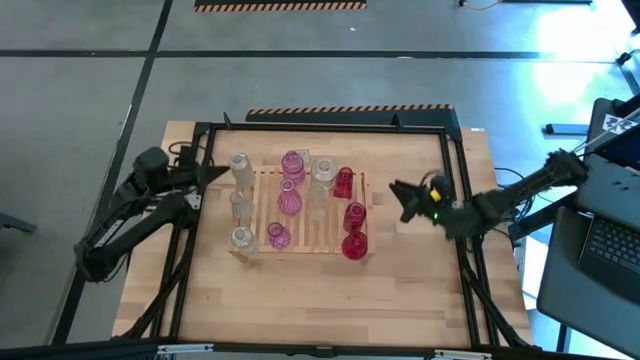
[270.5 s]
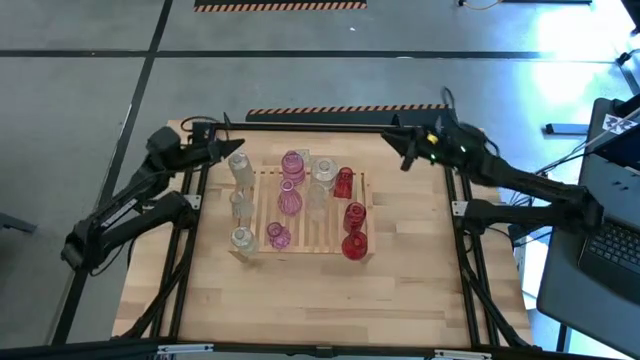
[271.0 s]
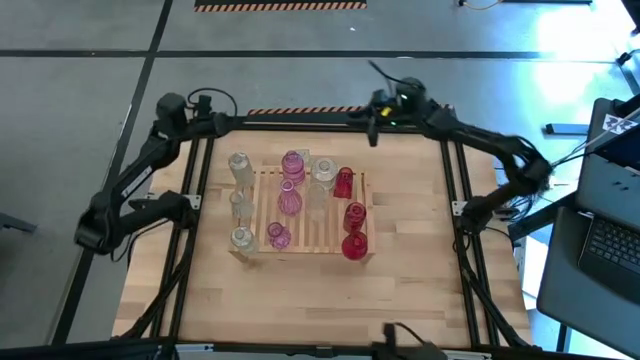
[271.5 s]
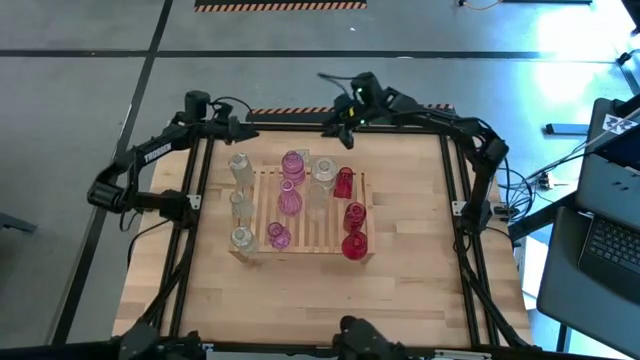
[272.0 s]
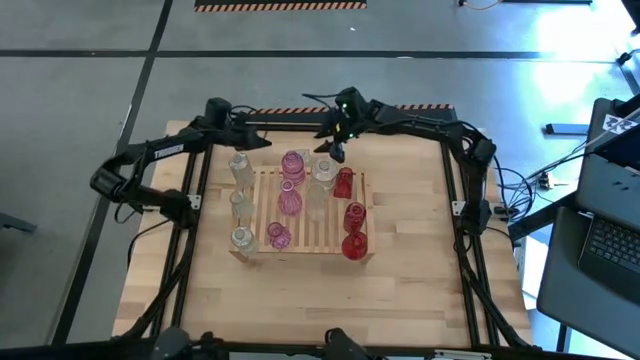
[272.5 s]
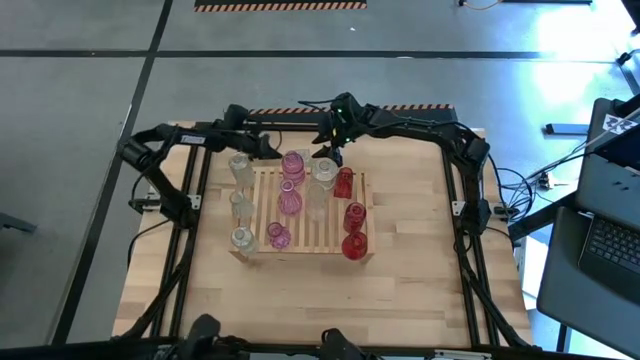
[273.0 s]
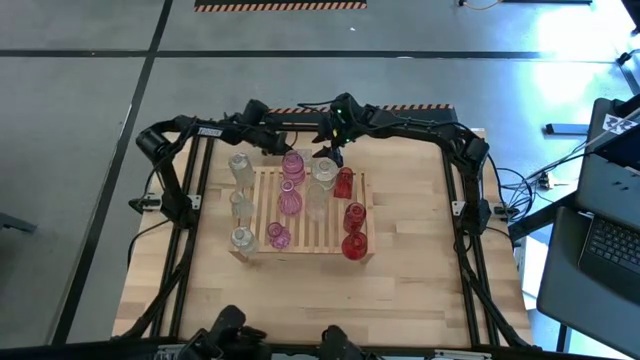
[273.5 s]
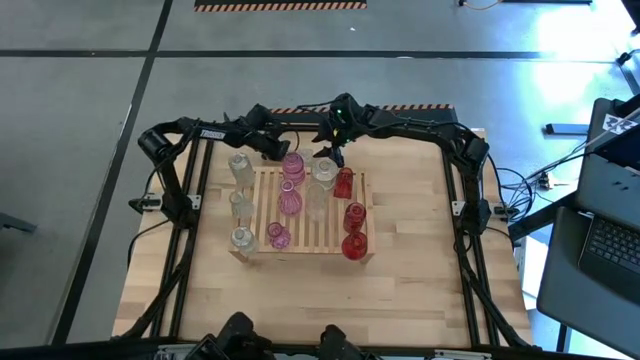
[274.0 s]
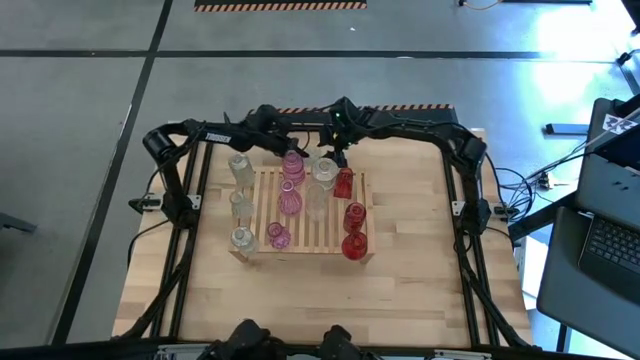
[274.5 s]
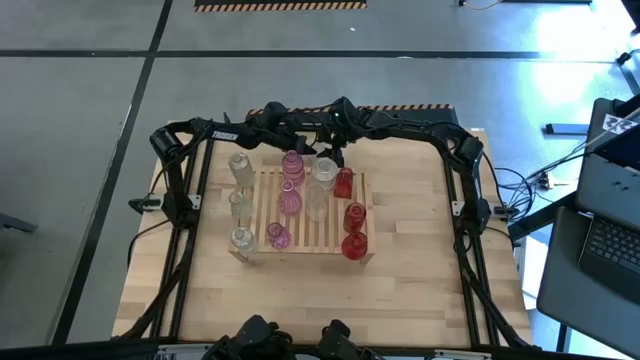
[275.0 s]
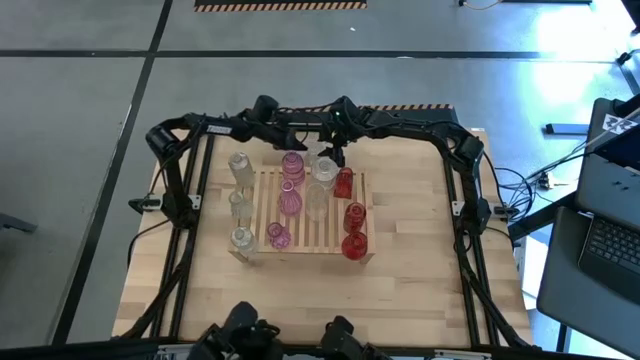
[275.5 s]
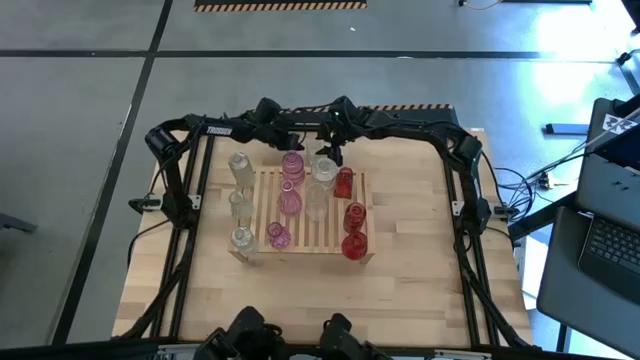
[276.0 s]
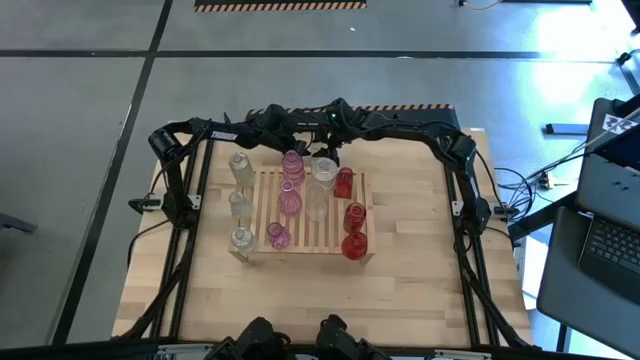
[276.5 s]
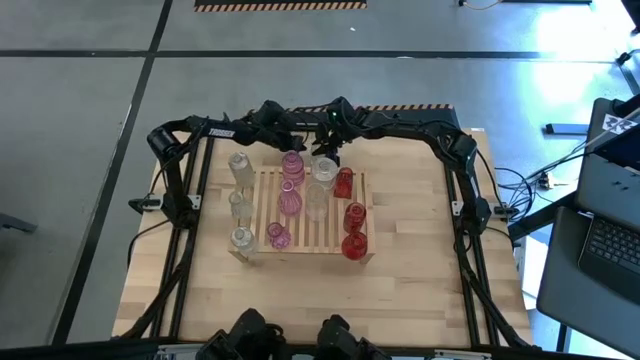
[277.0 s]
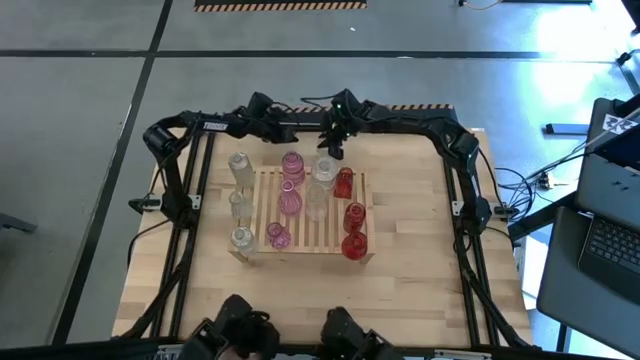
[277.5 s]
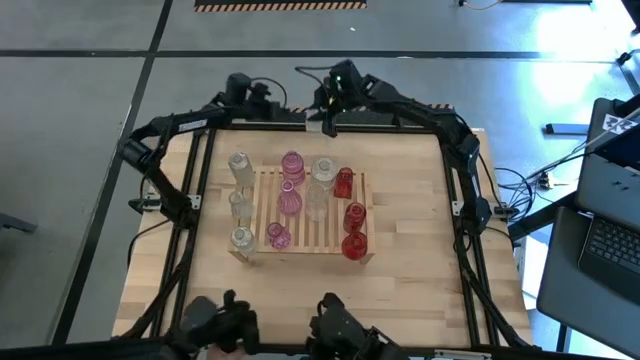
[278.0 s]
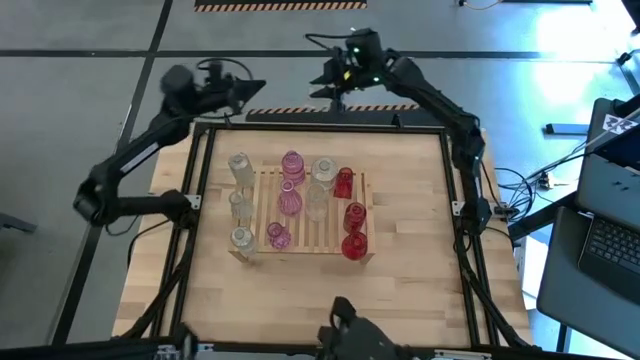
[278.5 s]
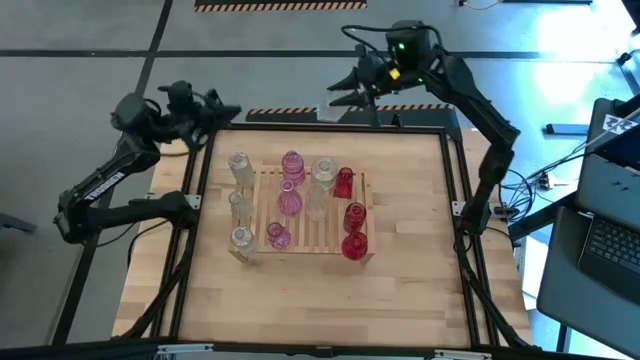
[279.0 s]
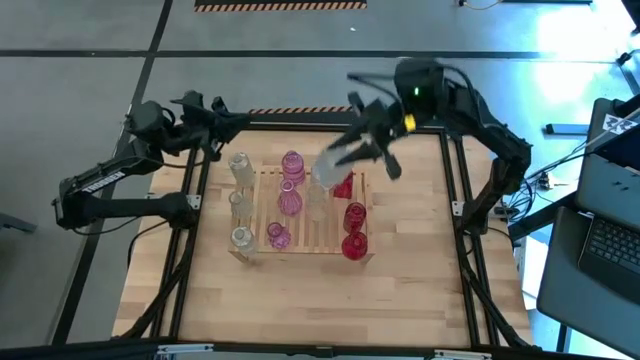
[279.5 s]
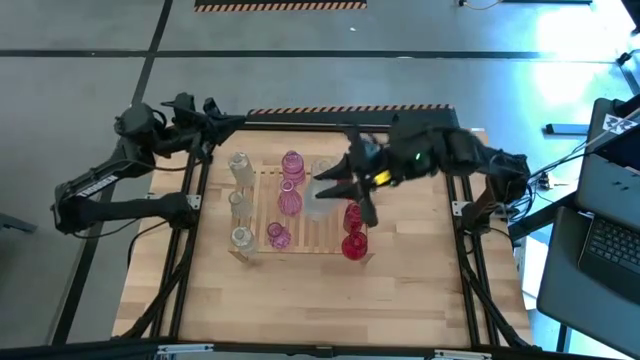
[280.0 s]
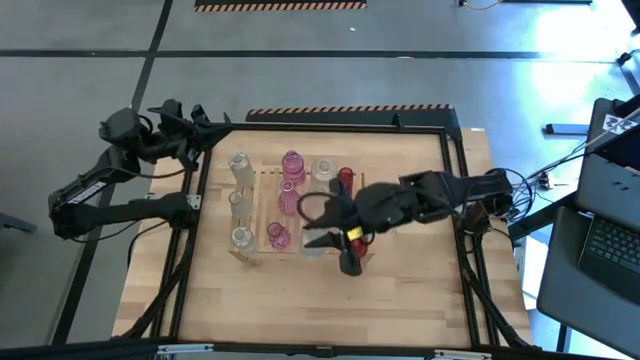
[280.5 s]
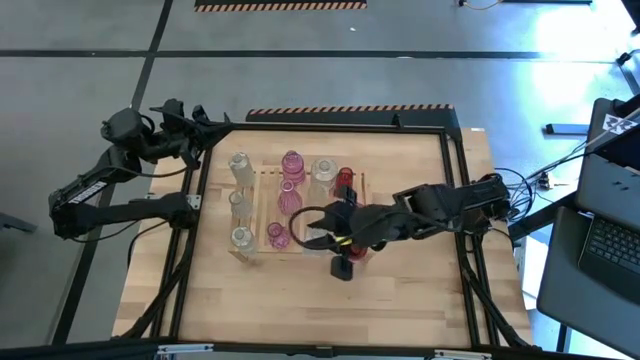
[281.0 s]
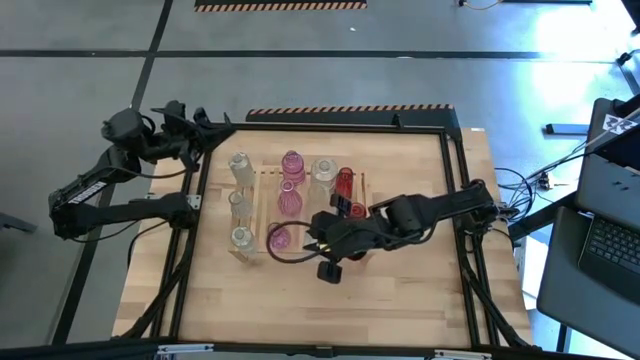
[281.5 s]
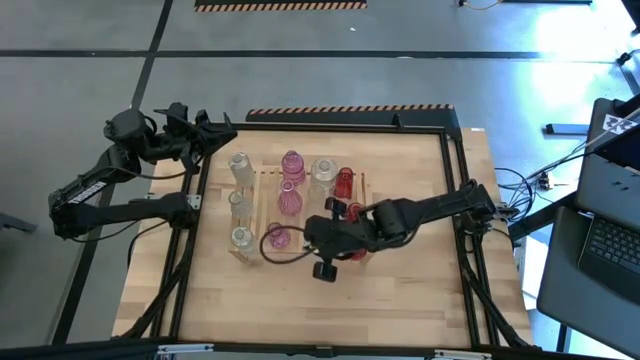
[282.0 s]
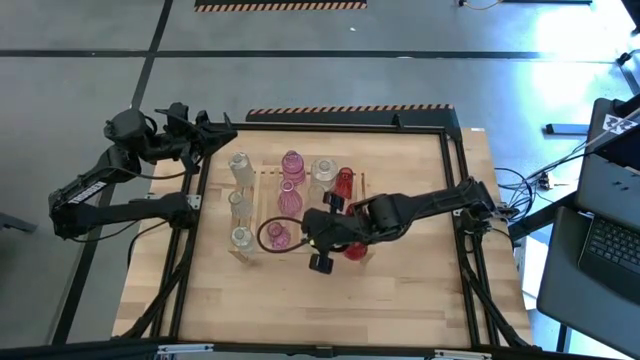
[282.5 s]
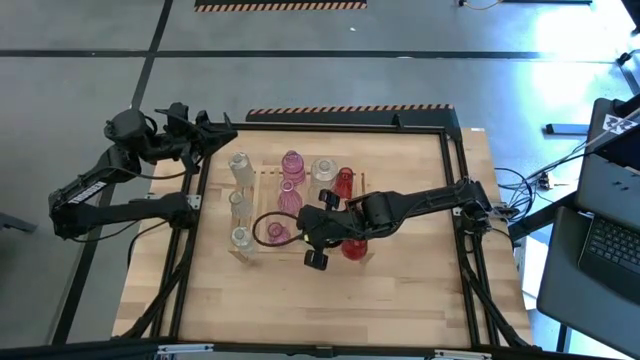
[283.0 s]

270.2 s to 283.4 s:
Task: sort vases onto shelf
Put the transparent vase on the shelf aligned with the other transparent vase

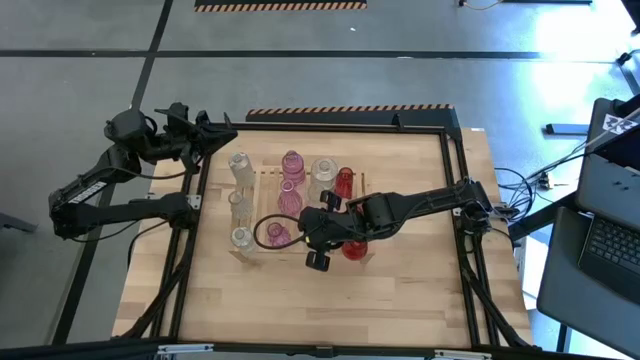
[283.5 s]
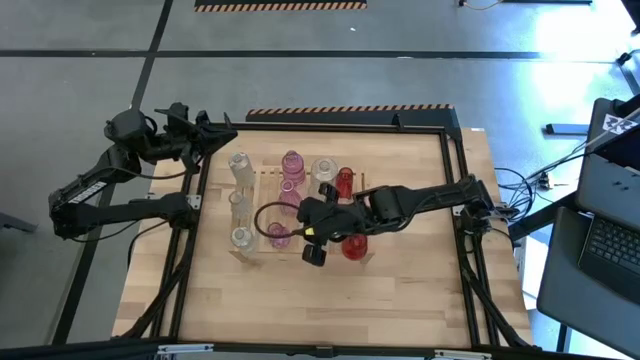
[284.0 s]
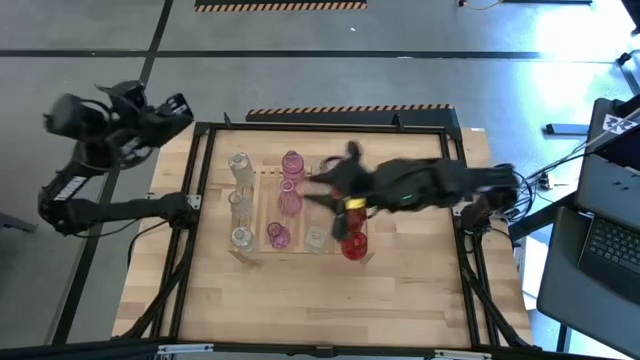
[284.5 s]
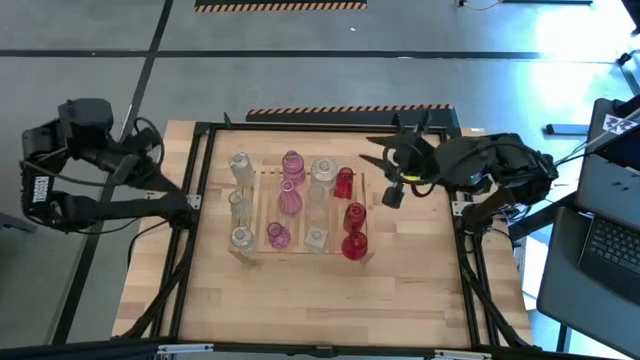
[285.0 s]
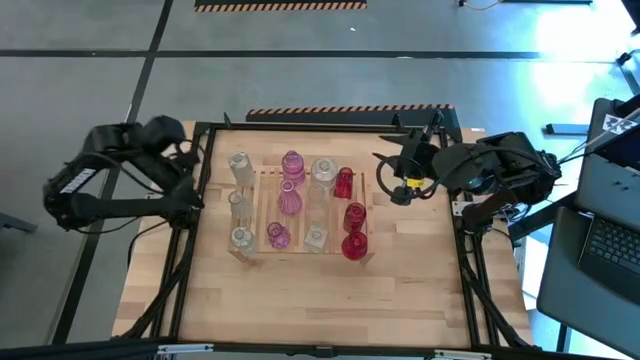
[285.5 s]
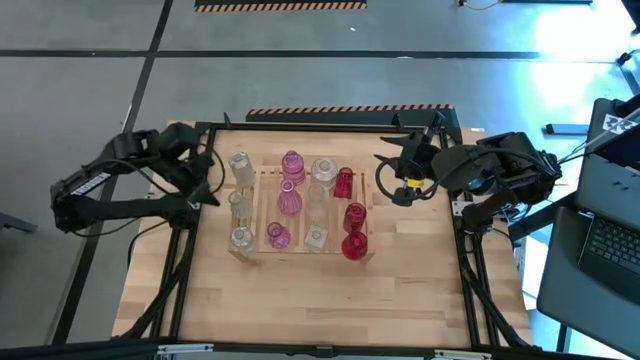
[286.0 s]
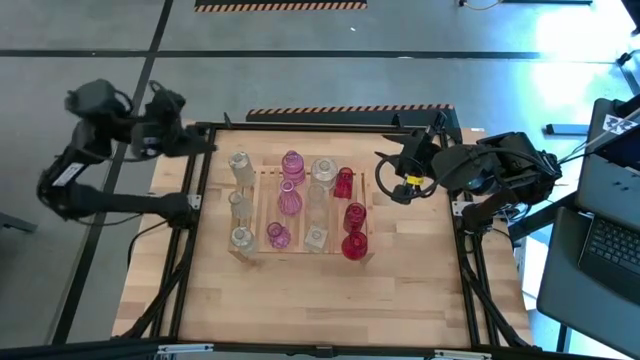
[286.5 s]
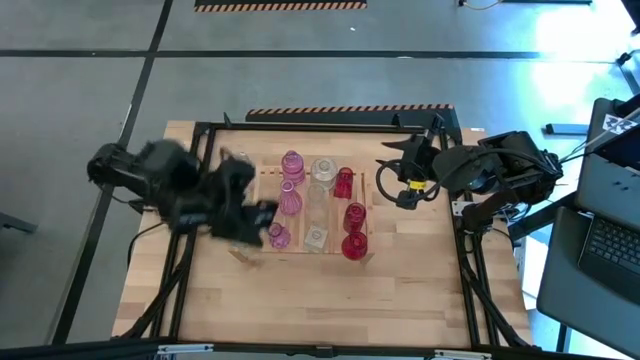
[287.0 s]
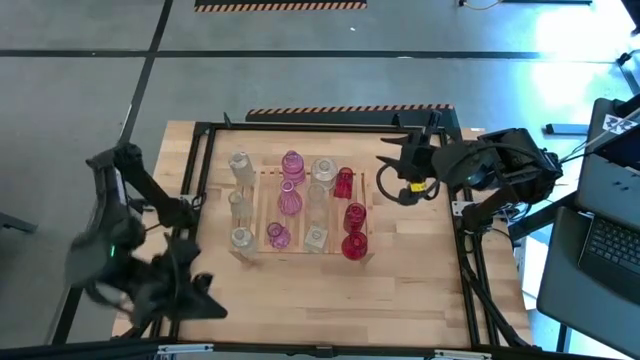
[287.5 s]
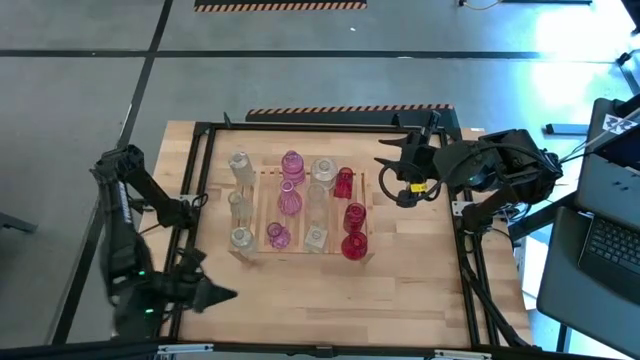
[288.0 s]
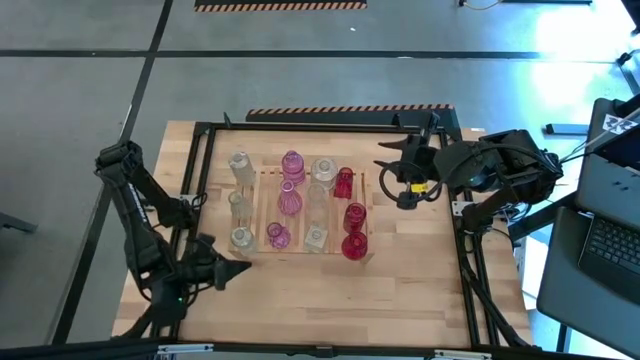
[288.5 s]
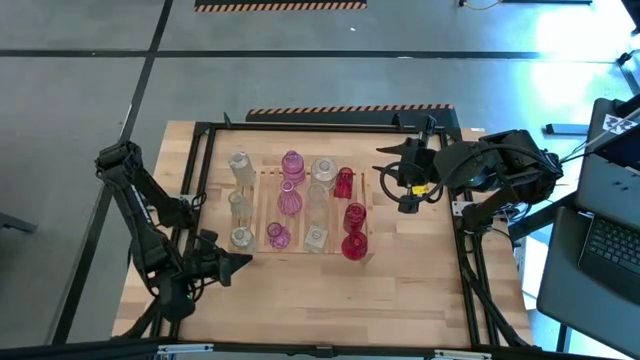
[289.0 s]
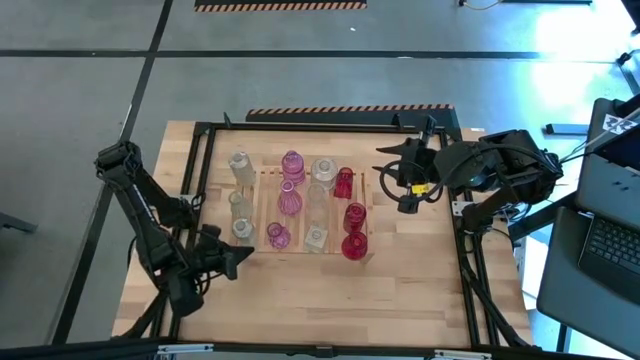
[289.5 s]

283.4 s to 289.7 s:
Adjust the transparent vase on the shelf

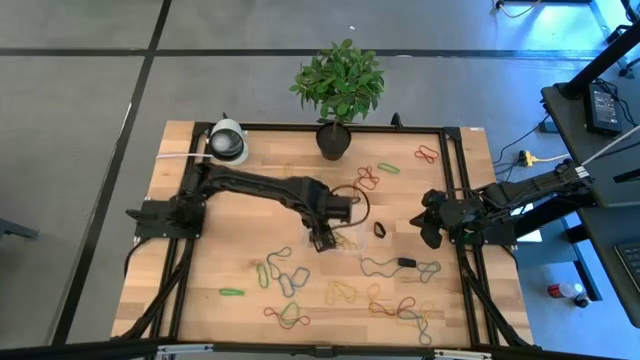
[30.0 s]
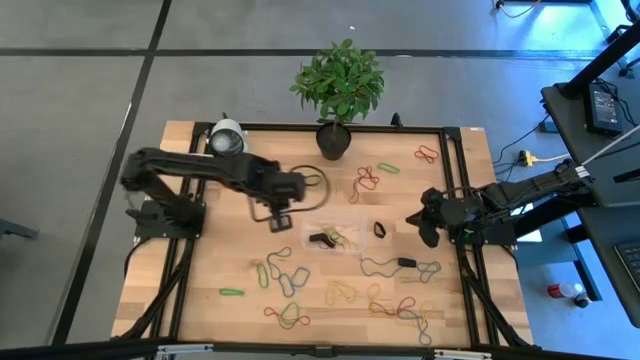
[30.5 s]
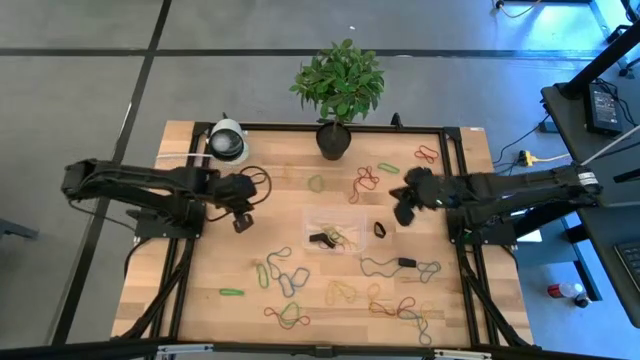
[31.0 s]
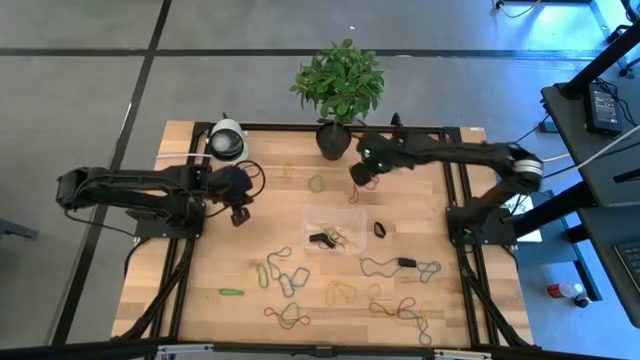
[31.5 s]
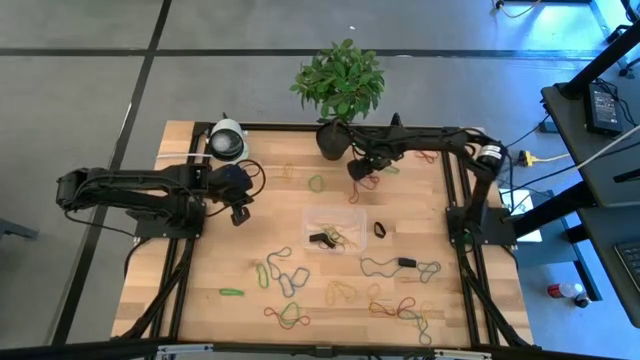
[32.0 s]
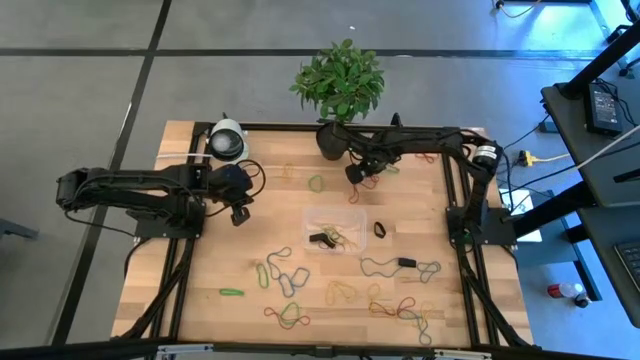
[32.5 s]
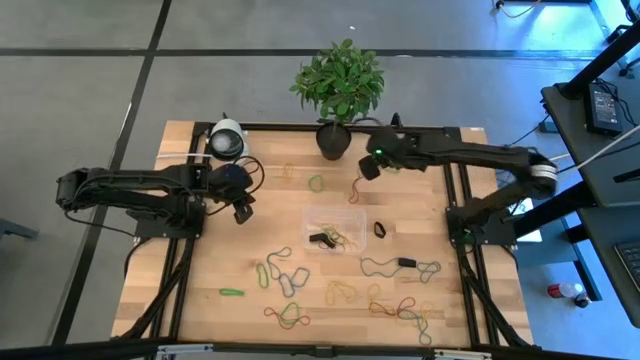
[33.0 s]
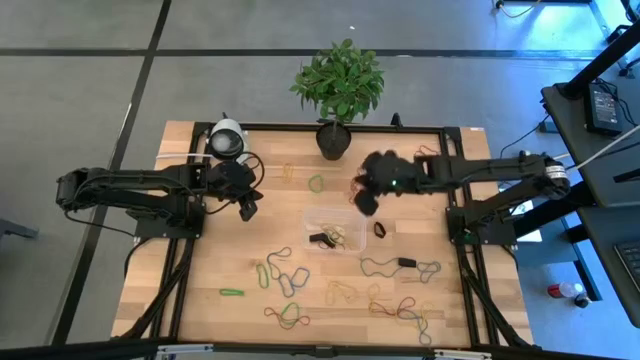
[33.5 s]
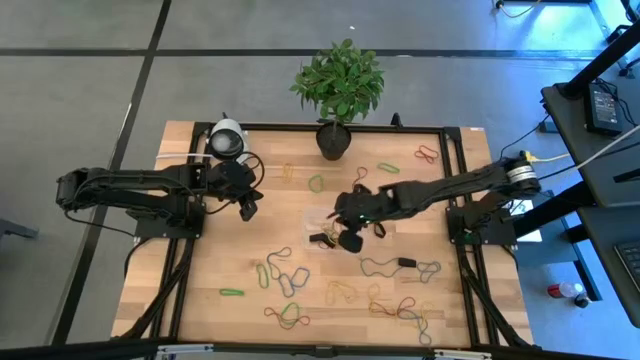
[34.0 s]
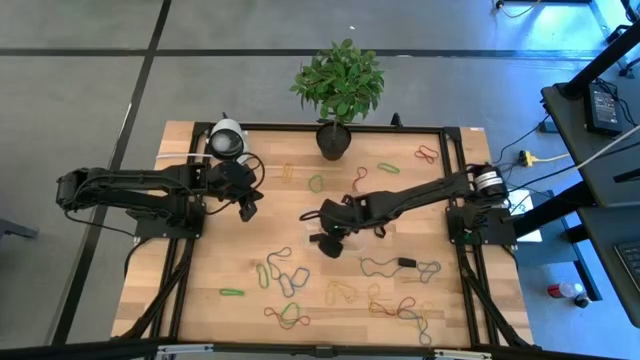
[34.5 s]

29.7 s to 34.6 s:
Task: Pick and place rubber bands into bin
Put the red rubber band into the bin
